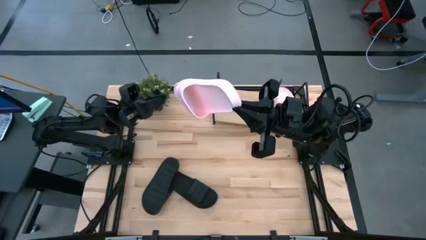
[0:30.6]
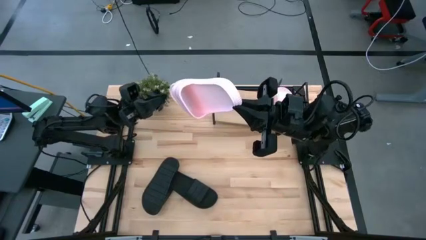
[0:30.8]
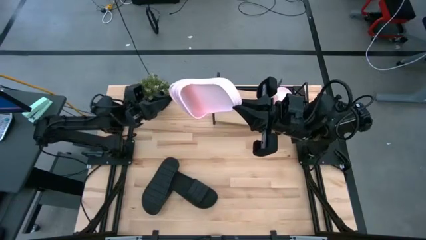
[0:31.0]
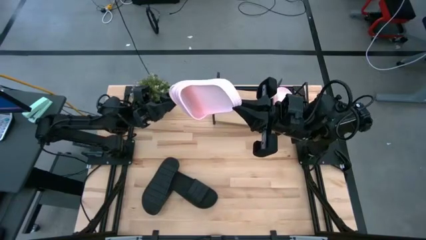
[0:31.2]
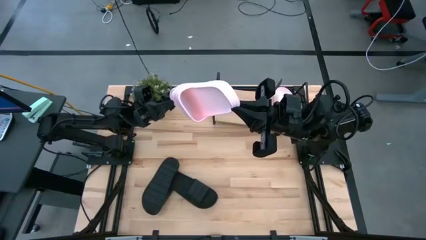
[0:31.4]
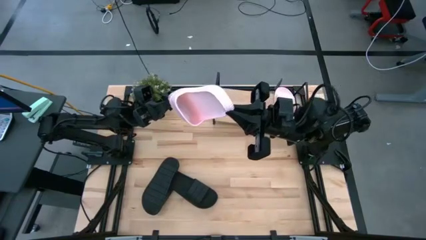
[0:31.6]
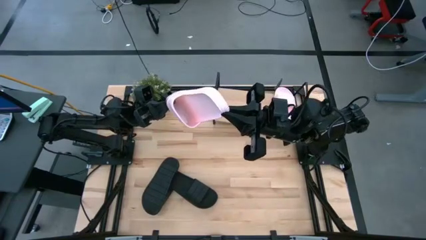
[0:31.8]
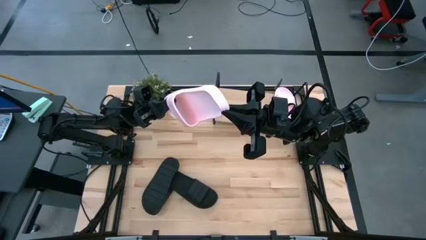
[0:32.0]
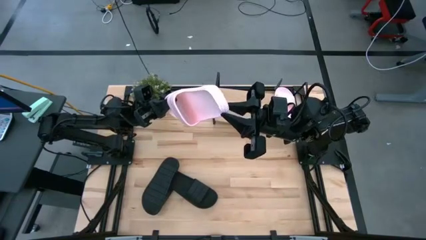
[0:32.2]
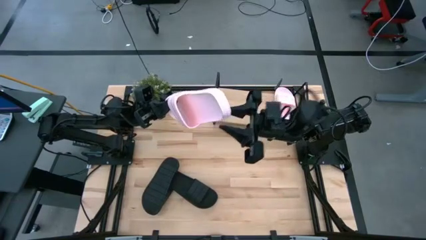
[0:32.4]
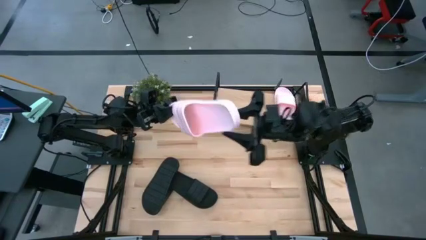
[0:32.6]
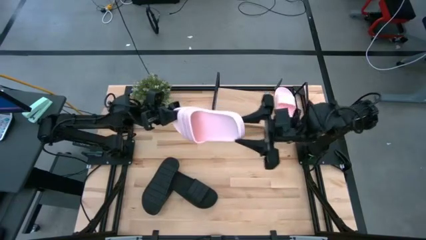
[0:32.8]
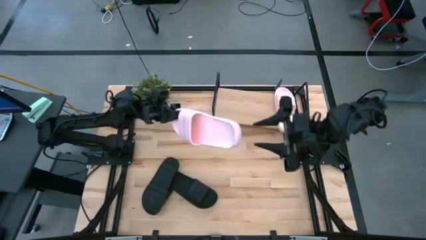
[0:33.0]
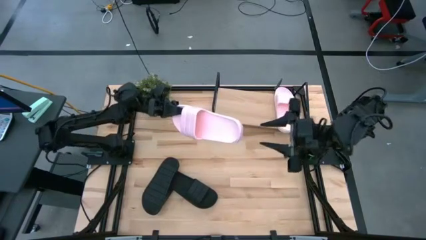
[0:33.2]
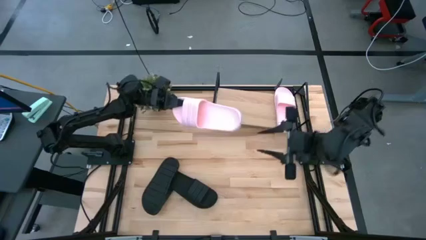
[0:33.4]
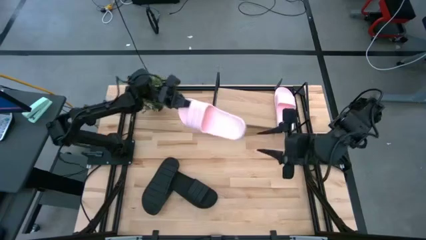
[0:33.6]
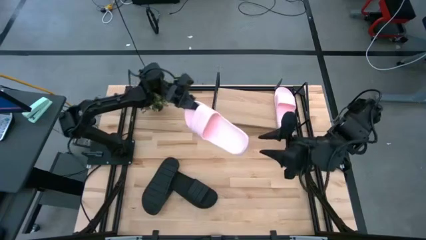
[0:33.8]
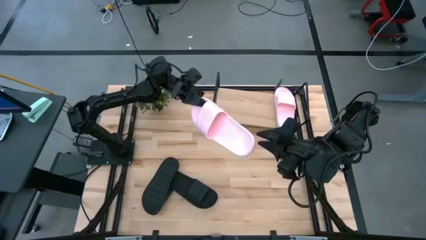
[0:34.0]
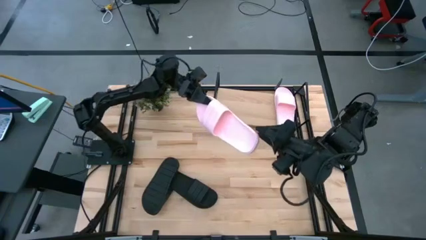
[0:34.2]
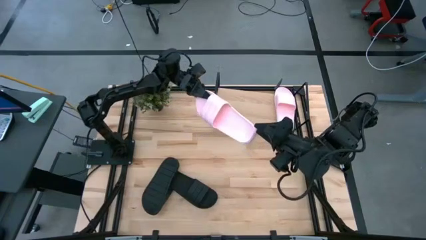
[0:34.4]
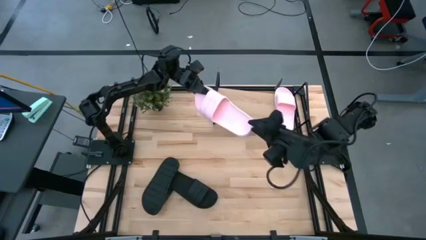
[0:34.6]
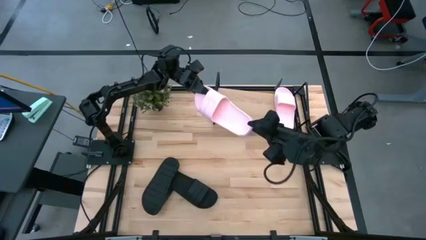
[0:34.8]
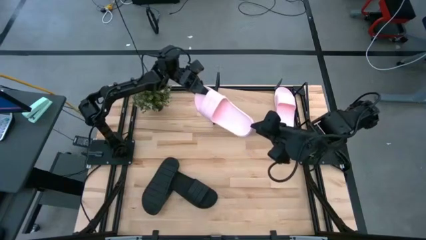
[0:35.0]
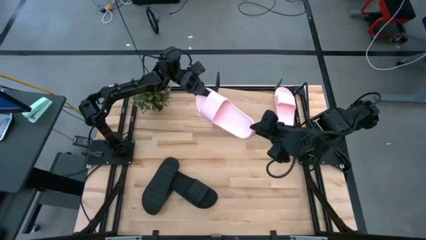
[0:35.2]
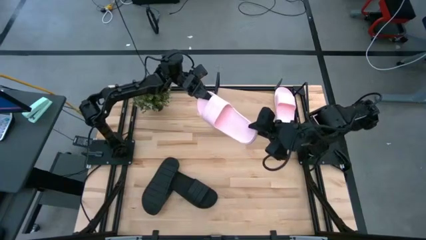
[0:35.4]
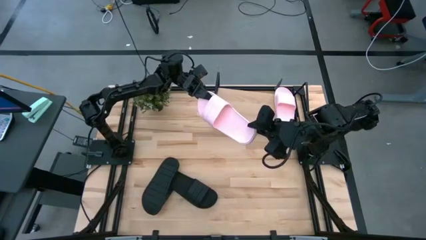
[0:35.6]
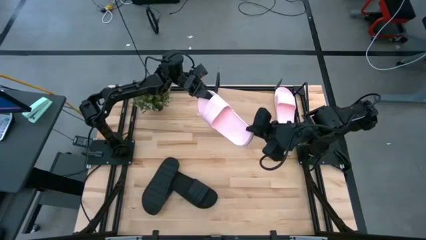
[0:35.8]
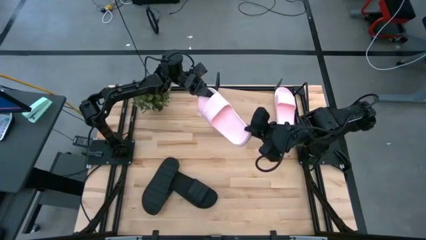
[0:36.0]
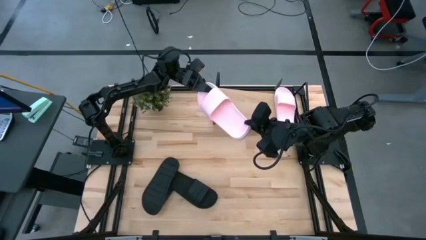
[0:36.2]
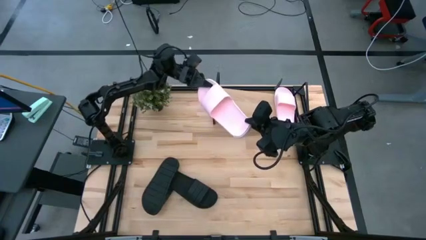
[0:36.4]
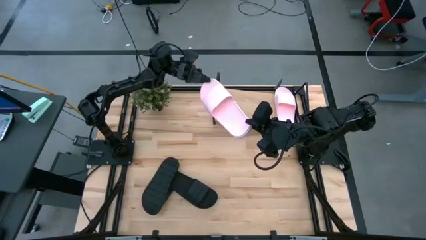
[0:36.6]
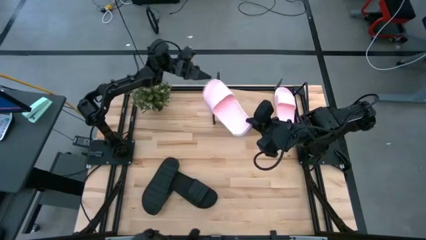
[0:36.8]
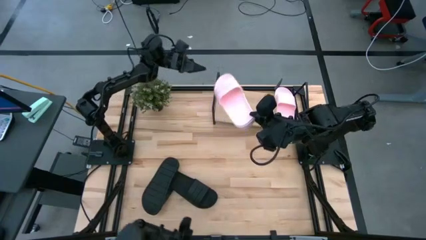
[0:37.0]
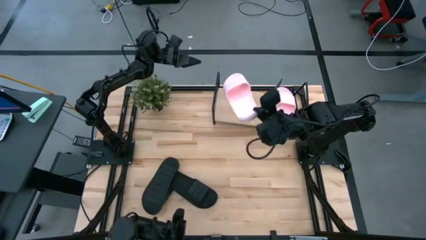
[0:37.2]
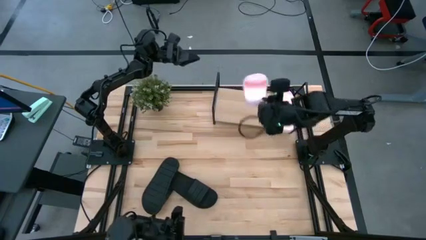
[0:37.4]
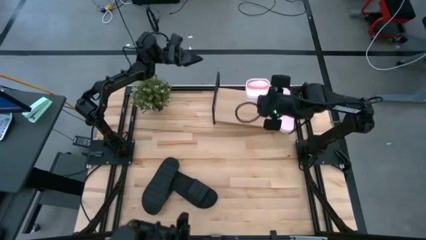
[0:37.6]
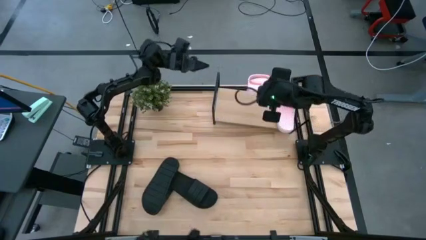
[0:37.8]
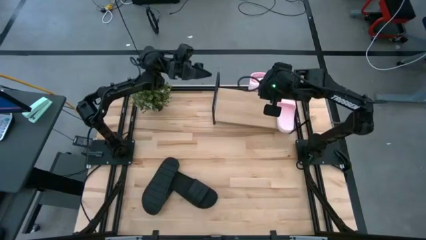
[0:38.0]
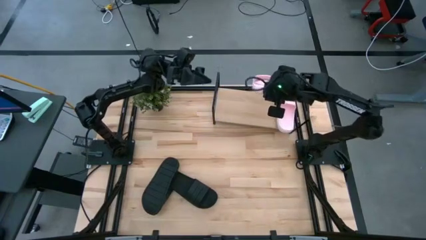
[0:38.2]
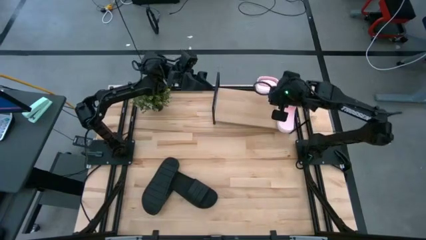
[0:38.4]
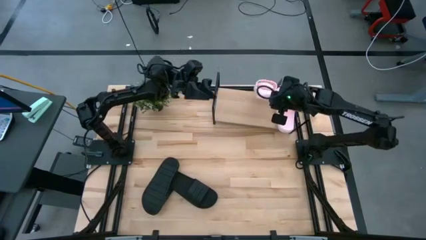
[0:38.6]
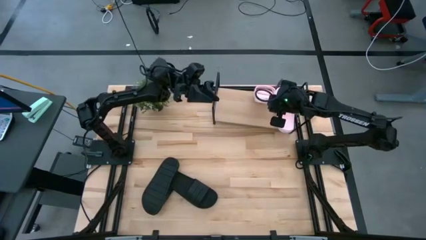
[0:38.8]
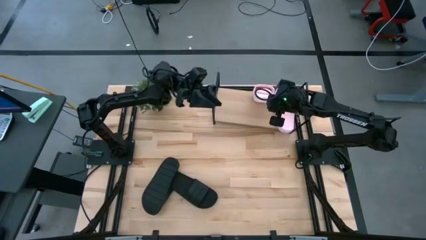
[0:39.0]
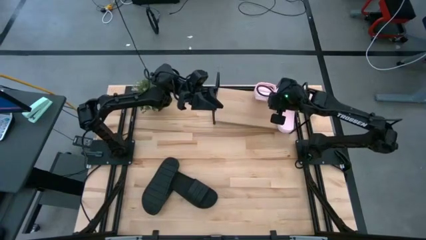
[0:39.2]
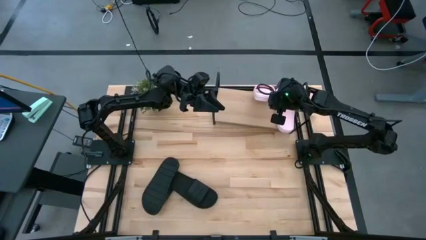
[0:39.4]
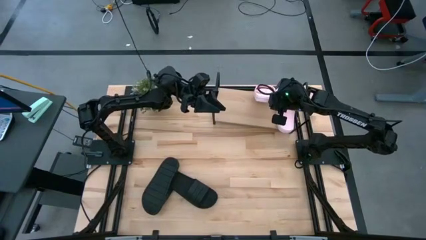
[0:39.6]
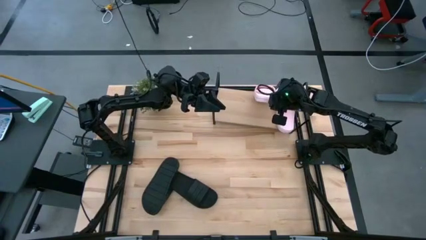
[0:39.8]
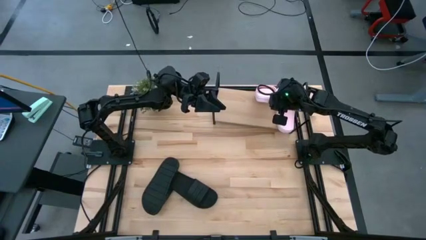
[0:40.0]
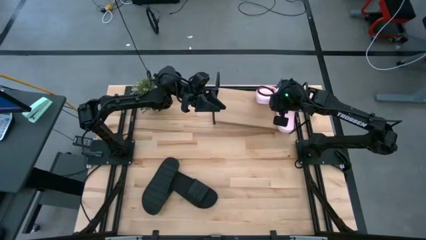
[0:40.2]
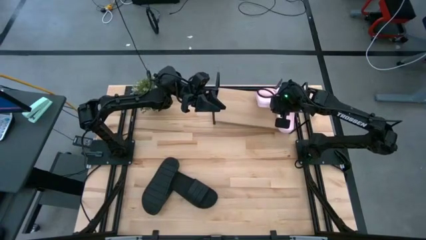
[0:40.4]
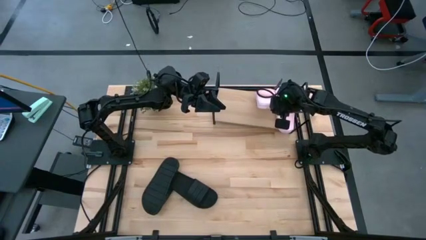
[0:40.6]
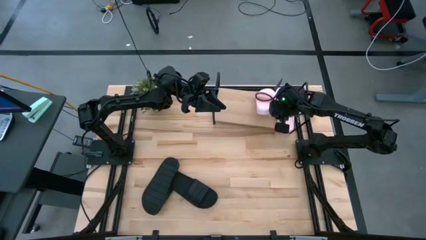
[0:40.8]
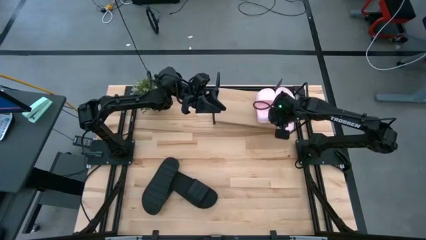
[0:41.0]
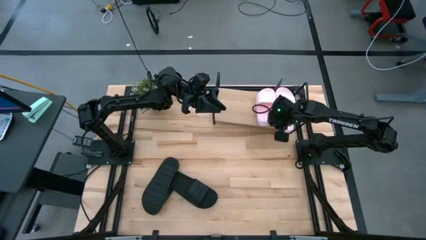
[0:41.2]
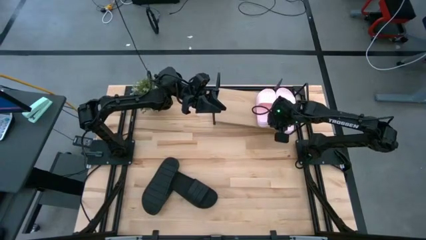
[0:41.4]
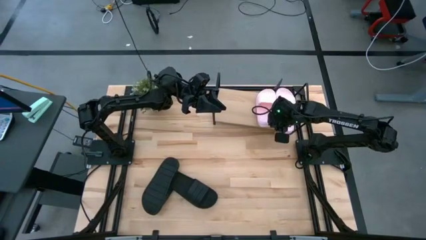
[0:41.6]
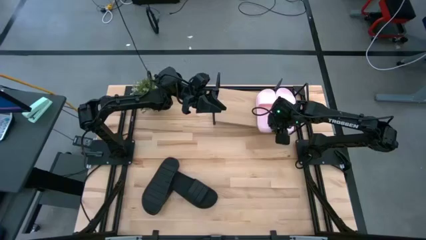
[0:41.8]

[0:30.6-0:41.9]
Task: Pick and place slides into the shelf
Put the pink slide on the shelf
